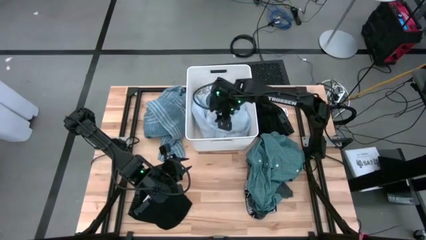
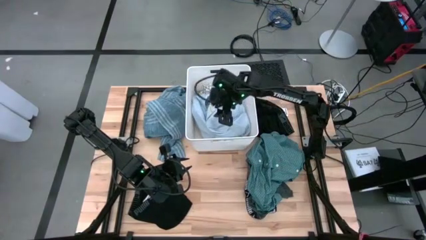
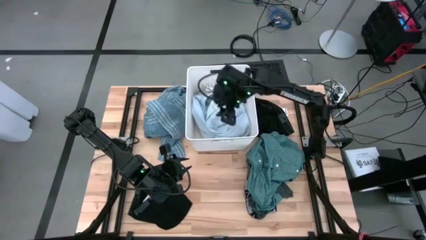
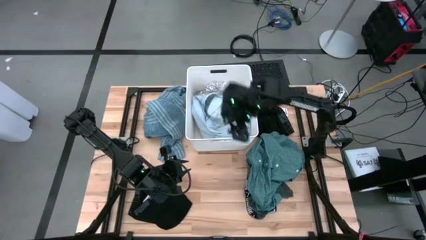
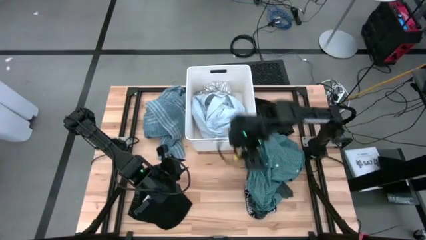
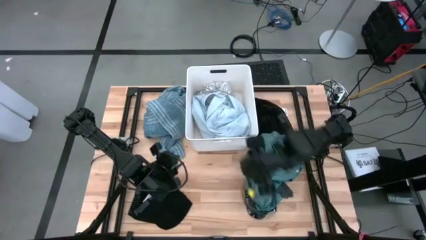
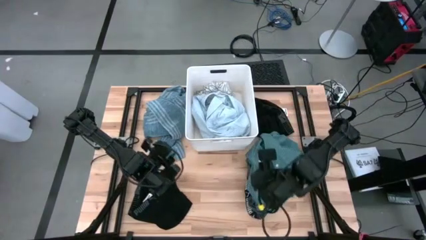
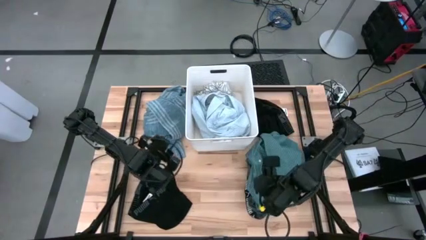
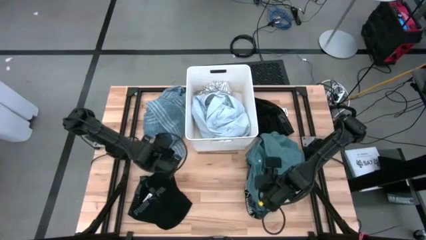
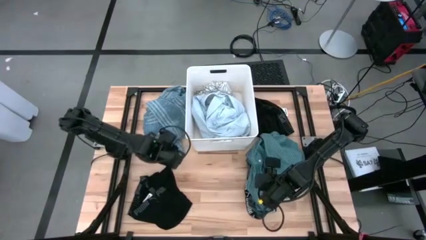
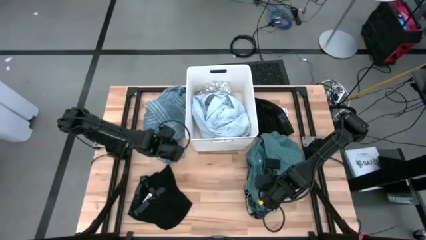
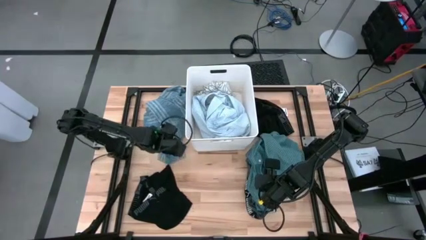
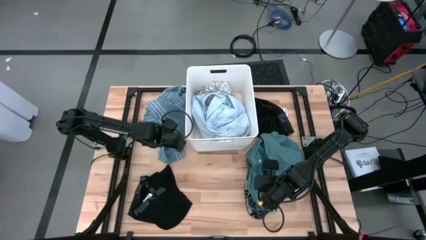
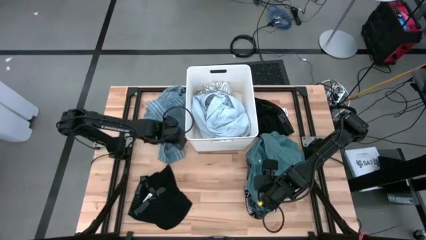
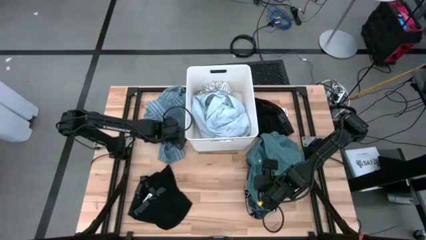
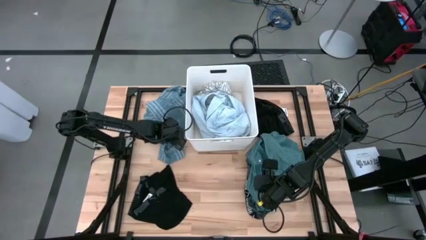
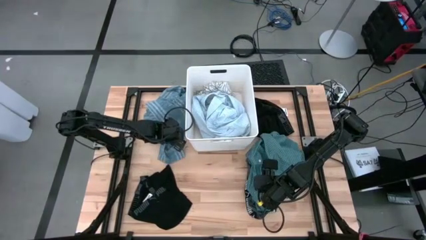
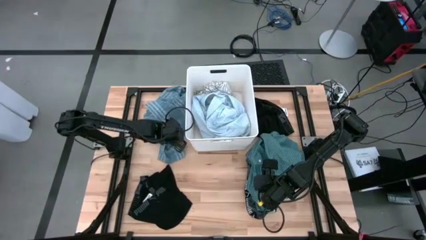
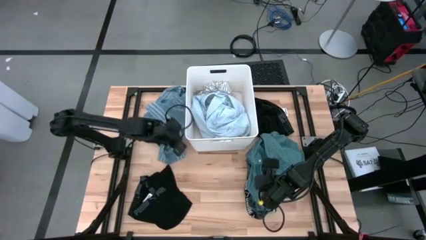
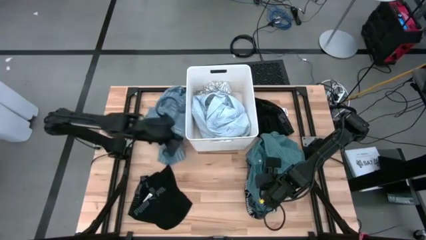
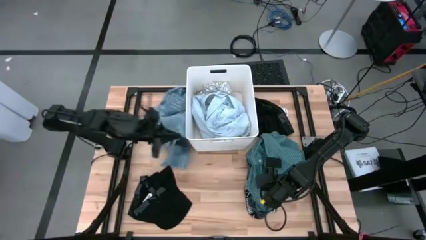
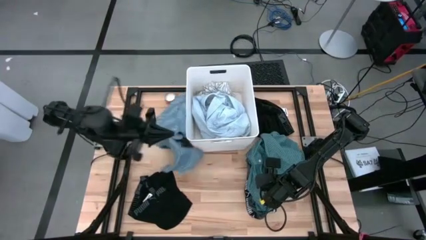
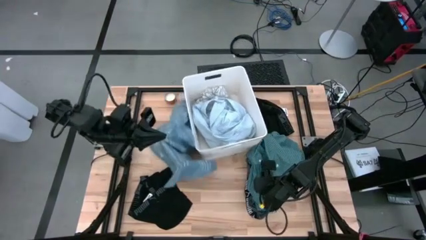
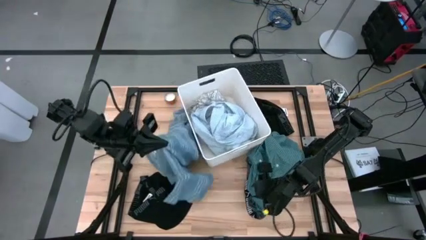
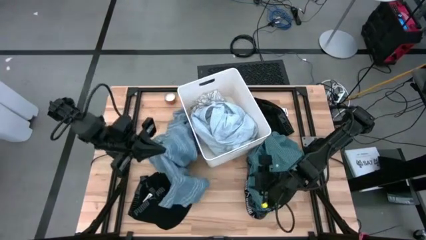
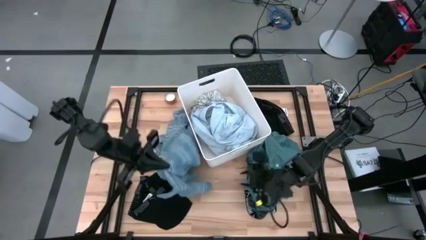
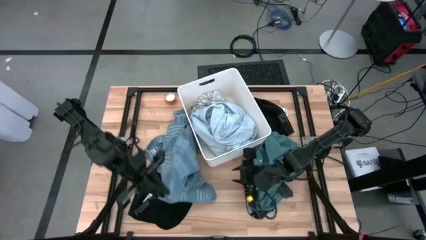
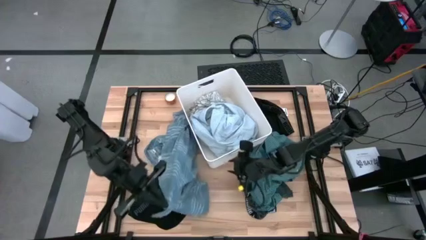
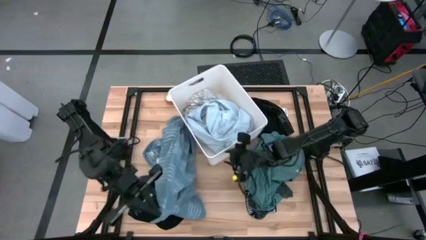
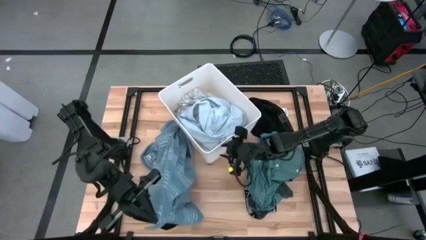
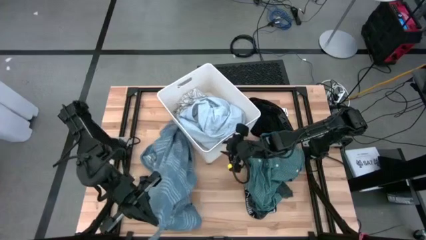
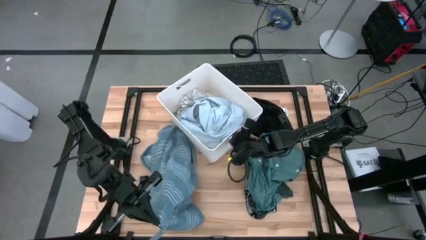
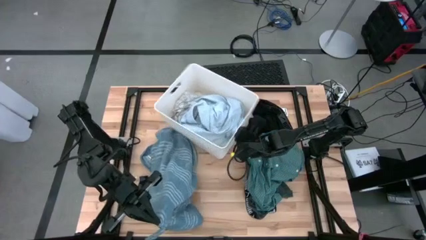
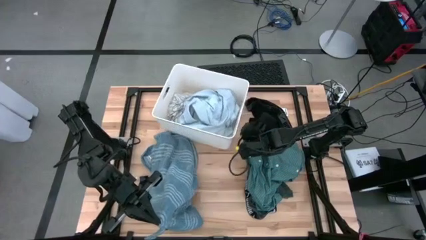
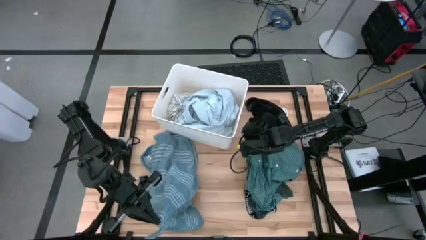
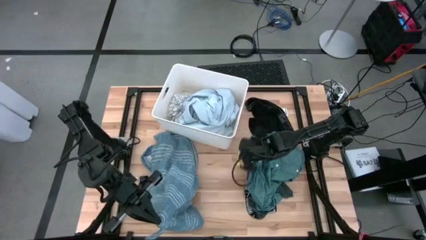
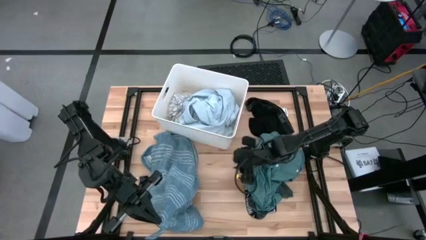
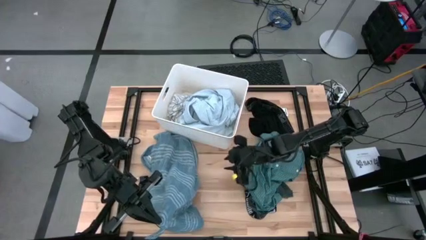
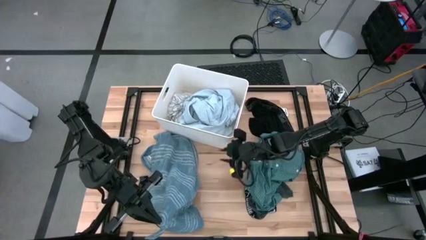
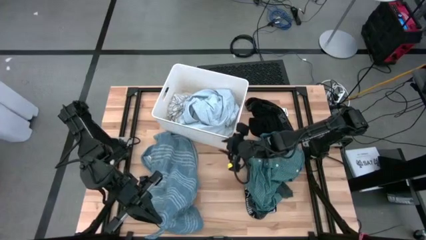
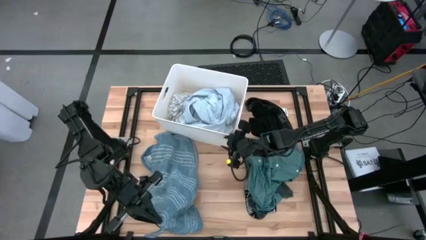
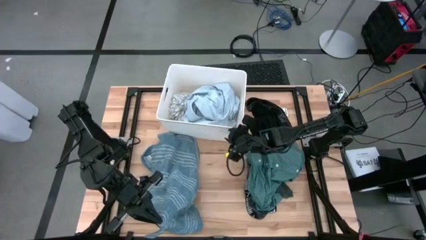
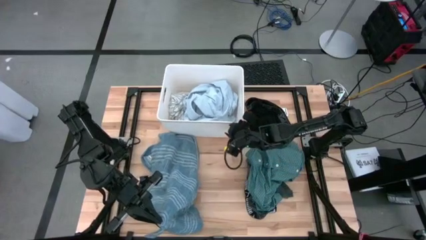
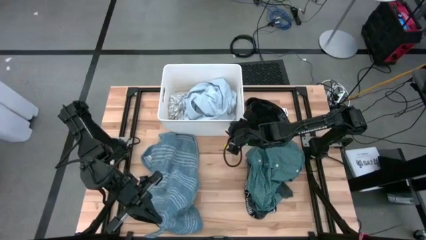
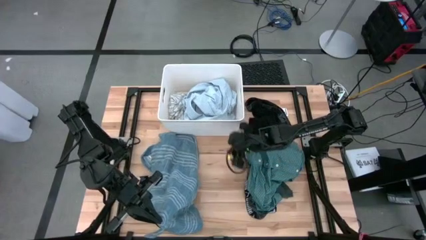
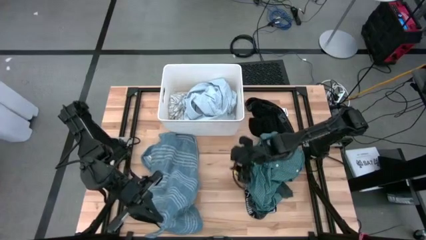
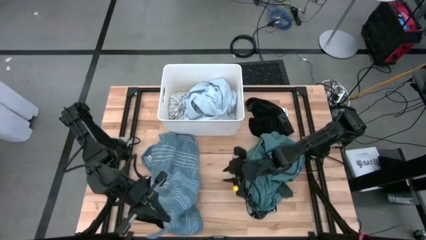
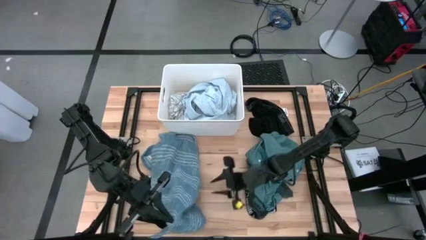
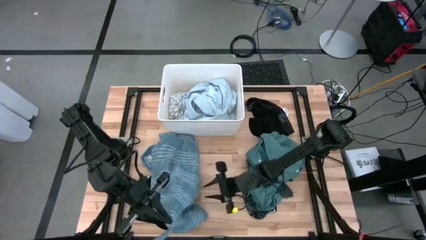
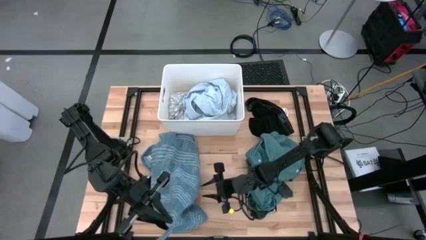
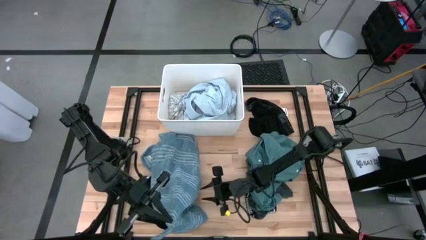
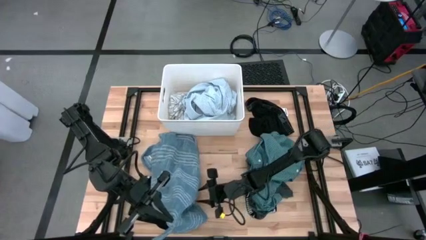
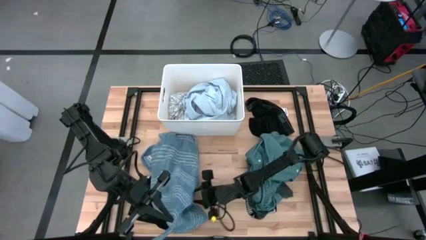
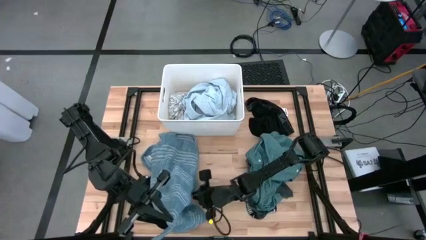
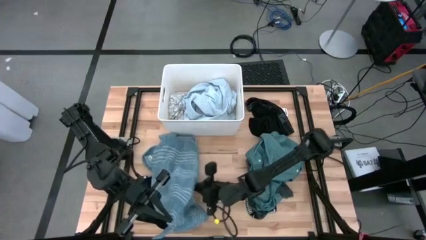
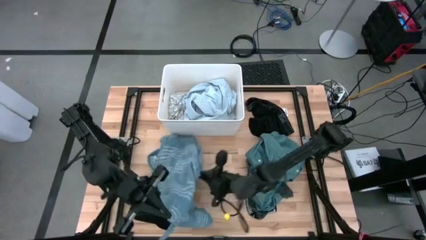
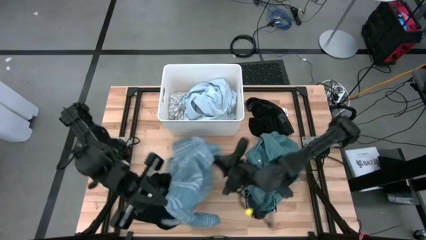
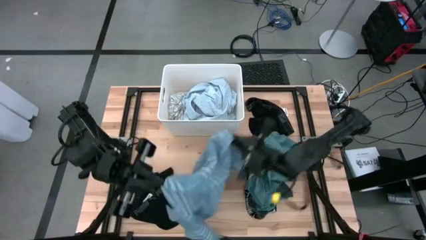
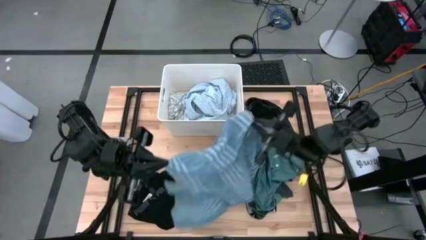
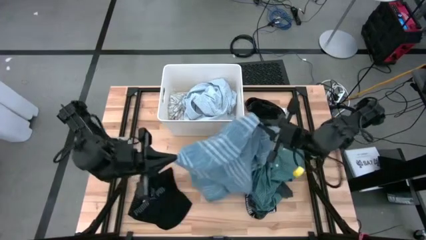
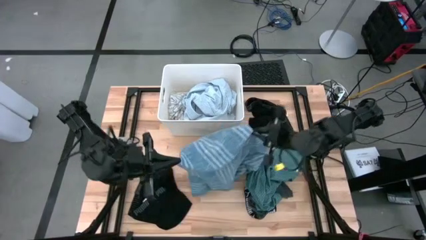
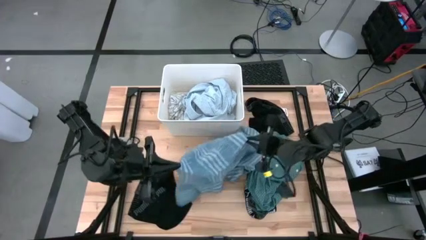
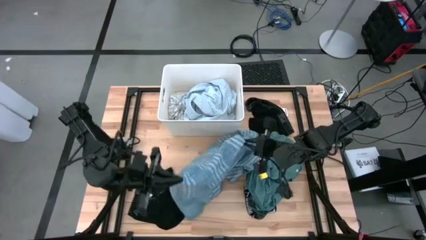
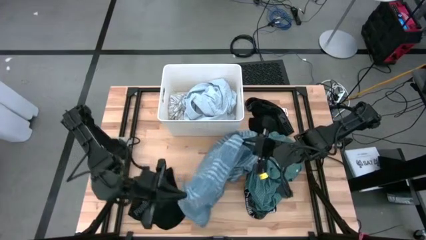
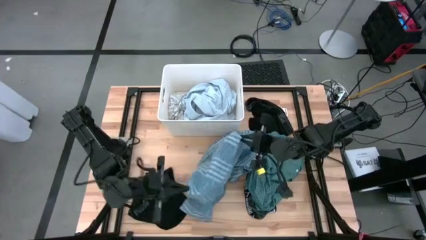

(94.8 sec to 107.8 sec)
Task: Sort clothes
Put the blue striped shirt into the white bin
